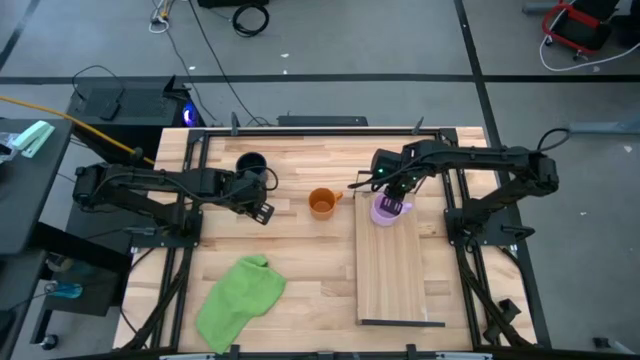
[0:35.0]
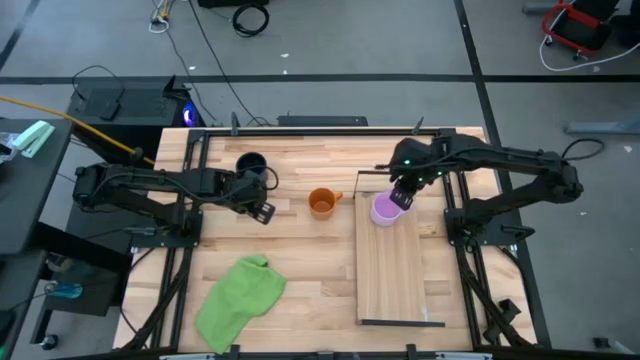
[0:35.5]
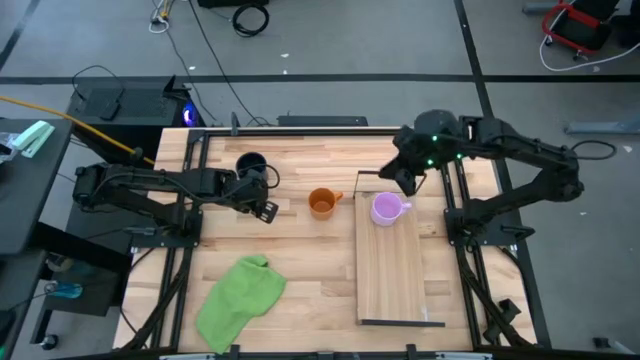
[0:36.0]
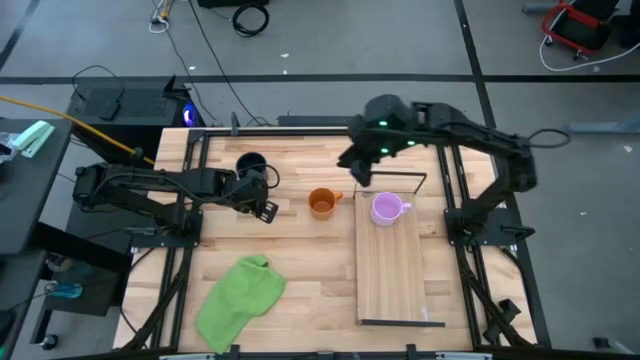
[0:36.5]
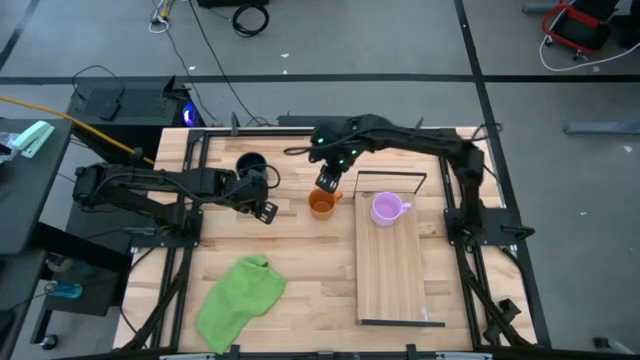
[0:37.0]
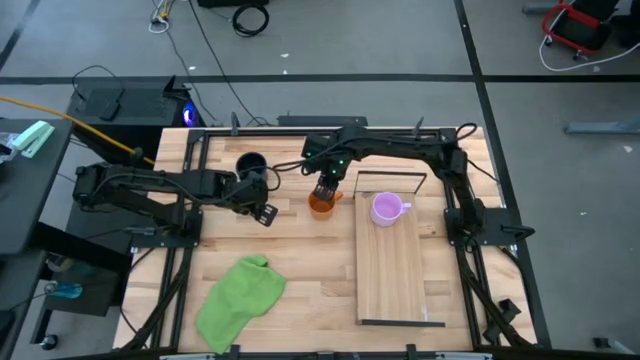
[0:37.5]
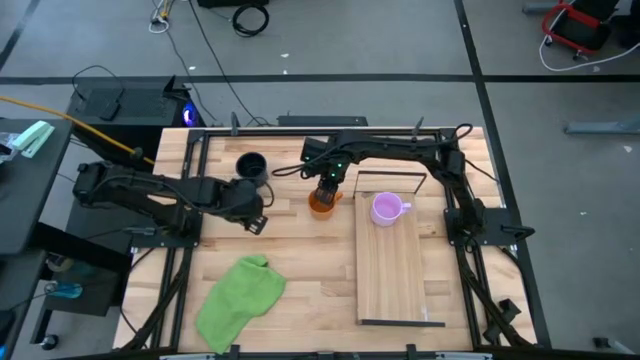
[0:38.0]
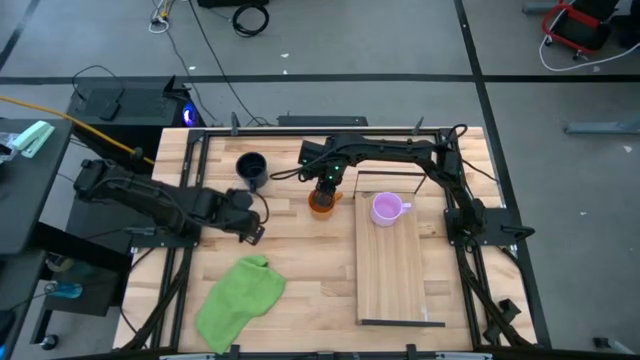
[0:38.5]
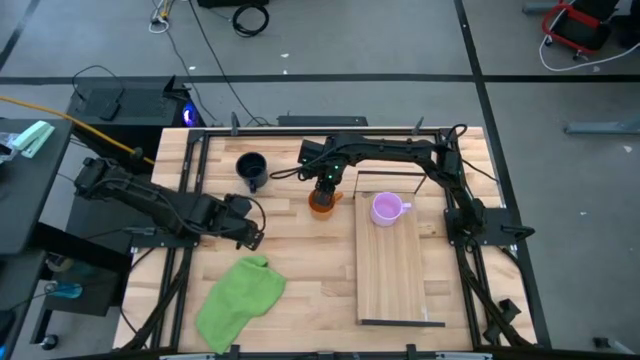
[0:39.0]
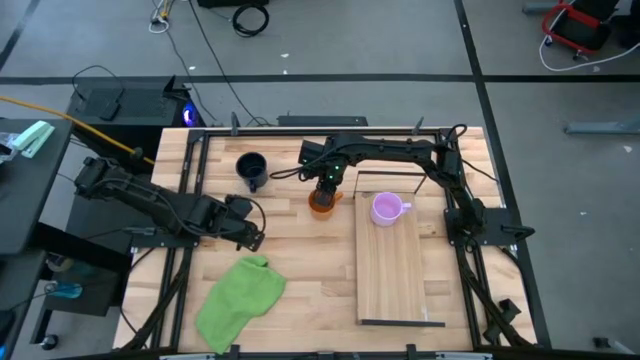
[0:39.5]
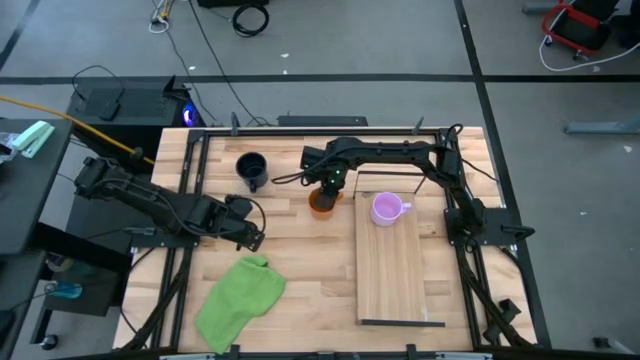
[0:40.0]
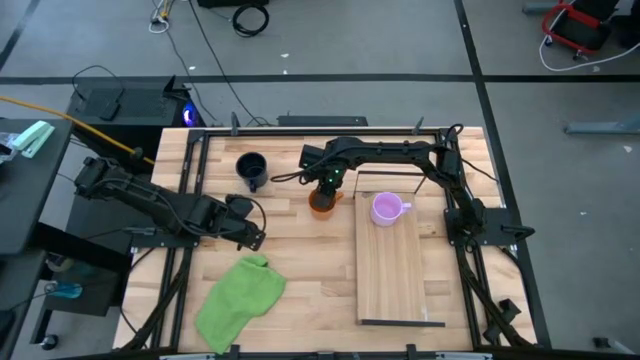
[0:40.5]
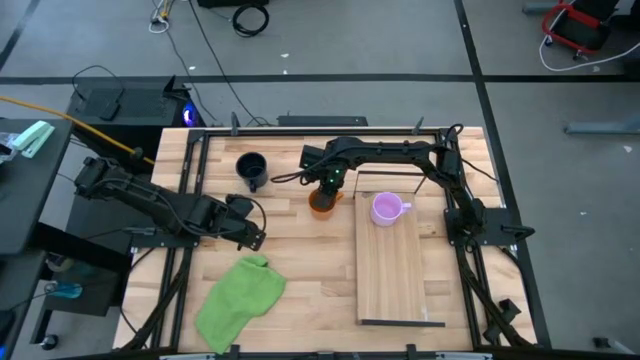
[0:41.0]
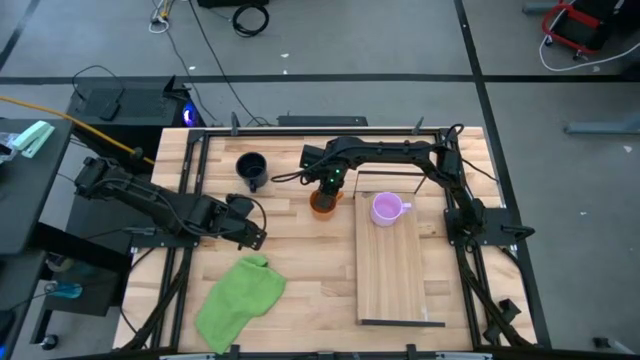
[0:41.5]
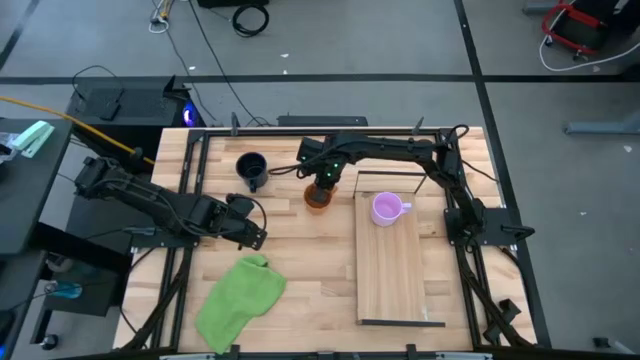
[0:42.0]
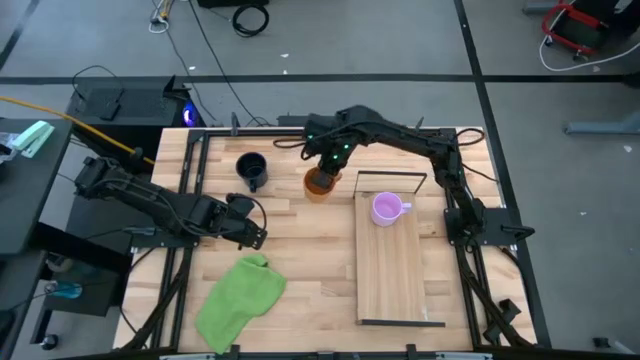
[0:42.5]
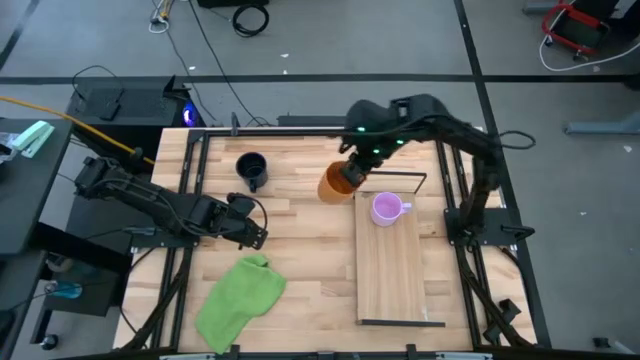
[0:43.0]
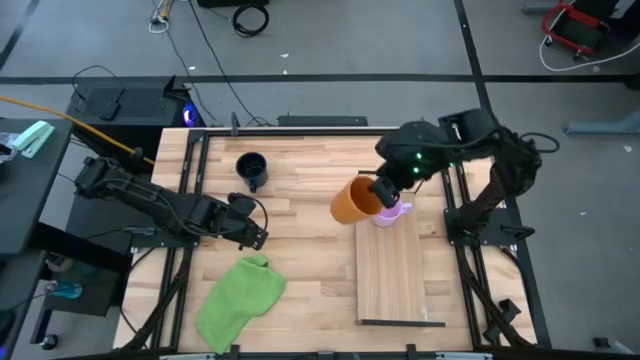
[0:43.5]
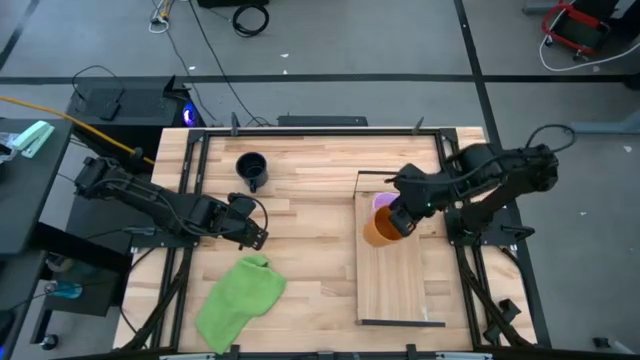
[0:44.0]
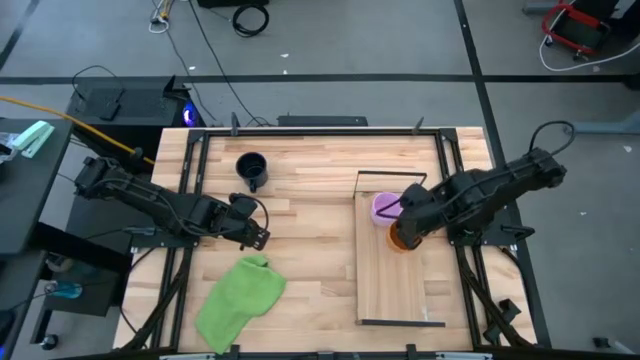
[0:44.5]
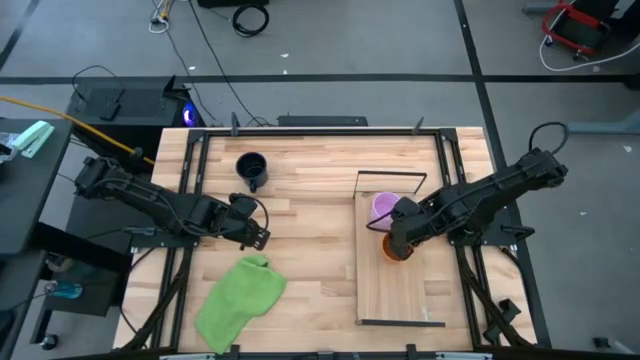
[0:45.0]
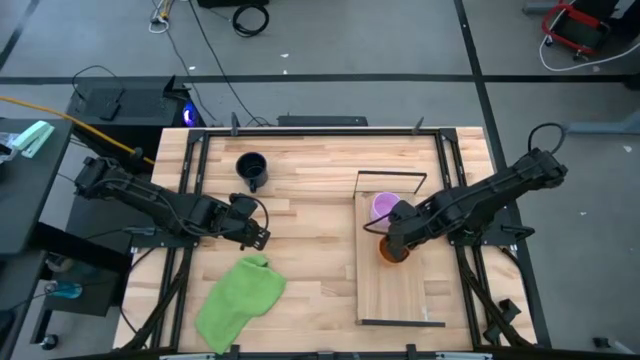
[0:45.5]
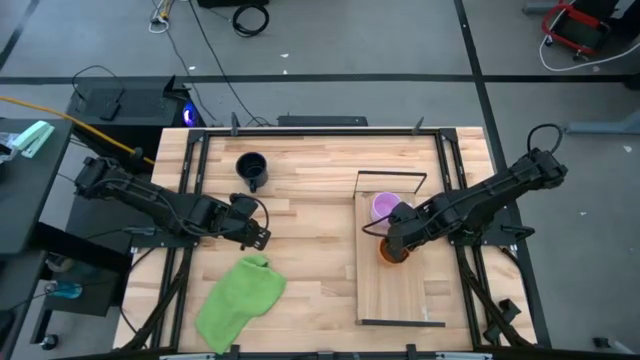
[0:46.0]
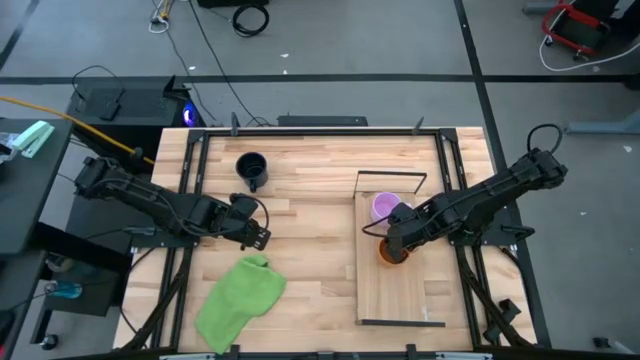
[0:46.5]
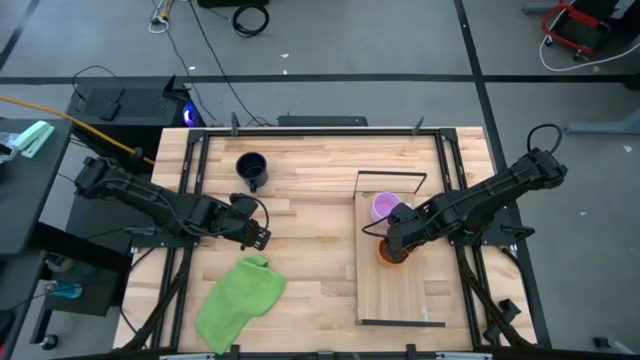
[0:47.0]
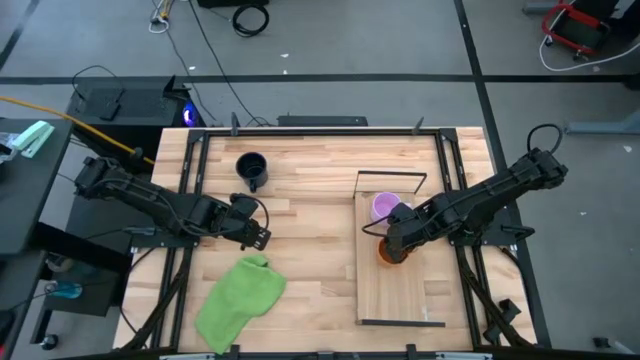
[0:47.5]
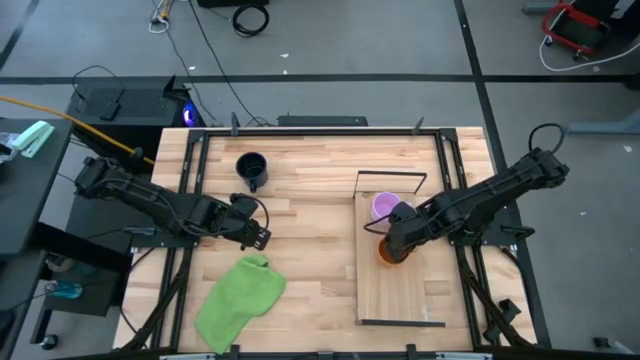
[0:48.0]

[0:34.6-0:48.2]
Task: Stack small to large cups/mugs on shelf
Put the orange mug on the table

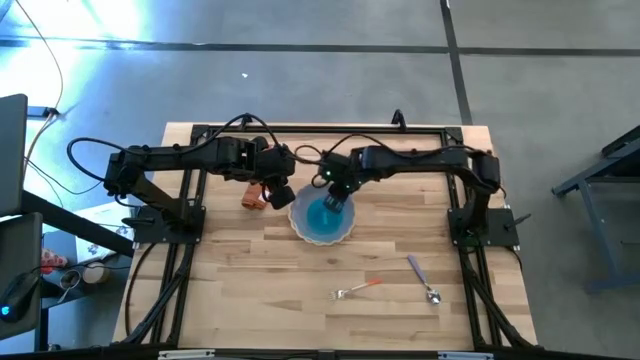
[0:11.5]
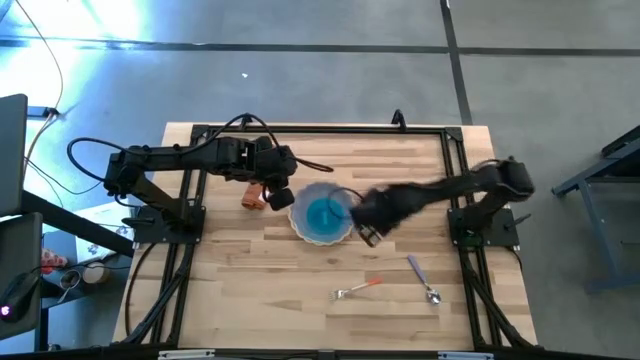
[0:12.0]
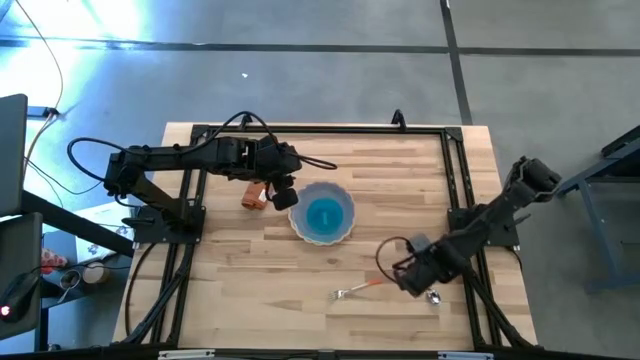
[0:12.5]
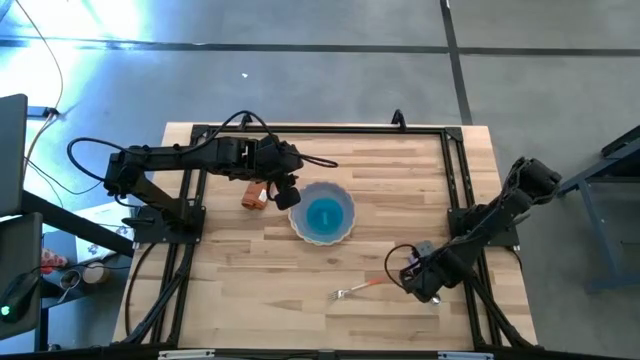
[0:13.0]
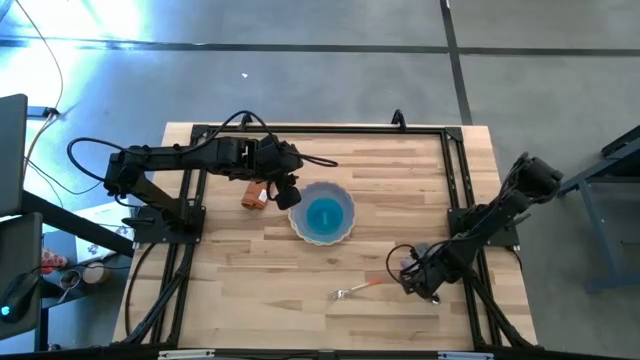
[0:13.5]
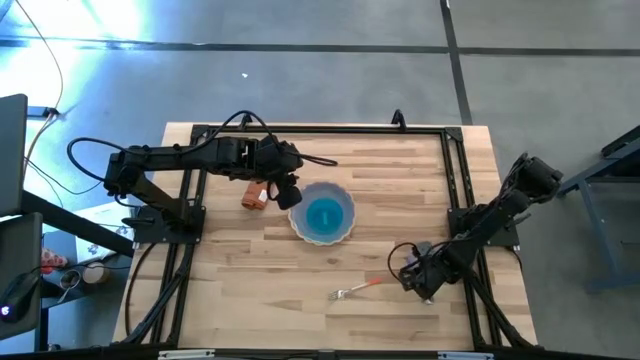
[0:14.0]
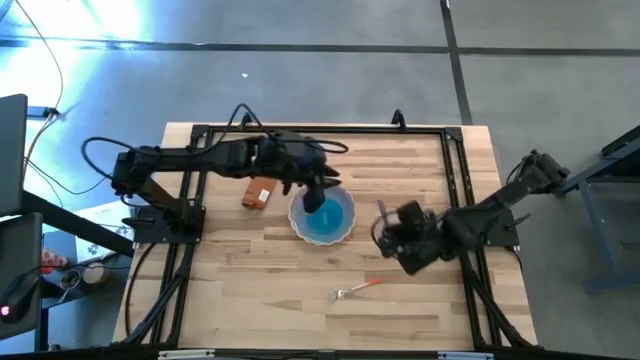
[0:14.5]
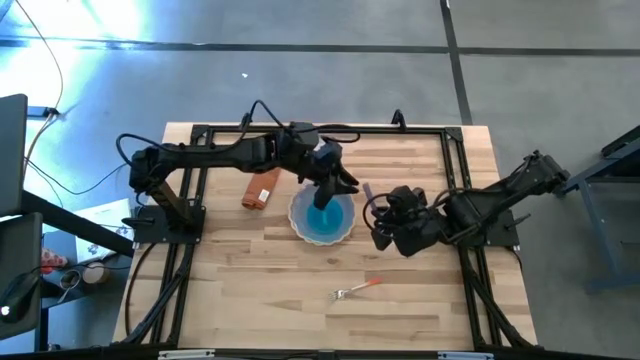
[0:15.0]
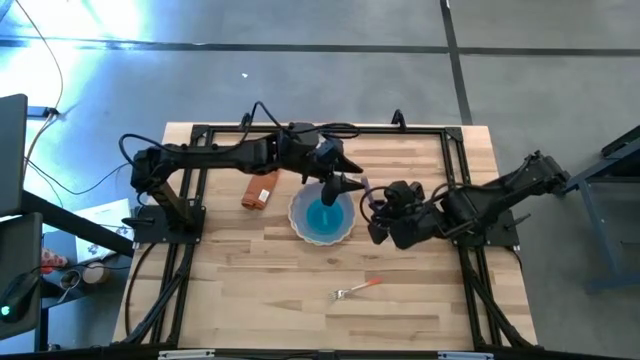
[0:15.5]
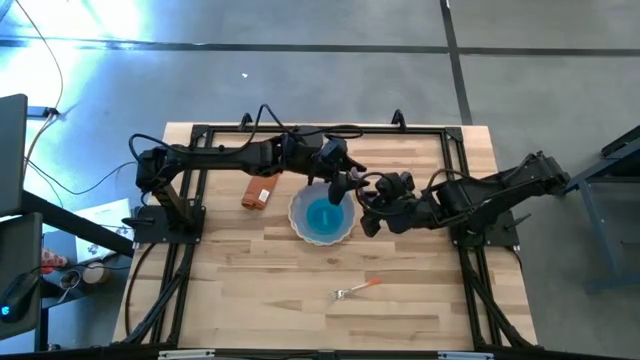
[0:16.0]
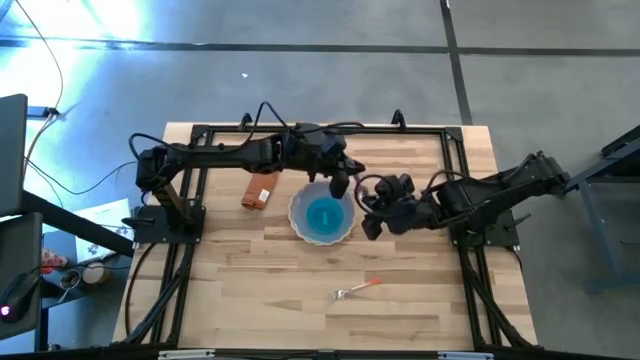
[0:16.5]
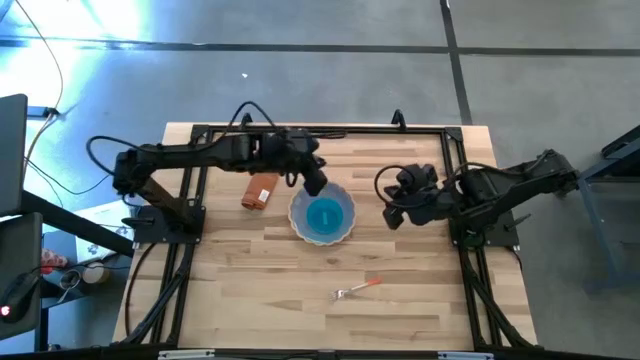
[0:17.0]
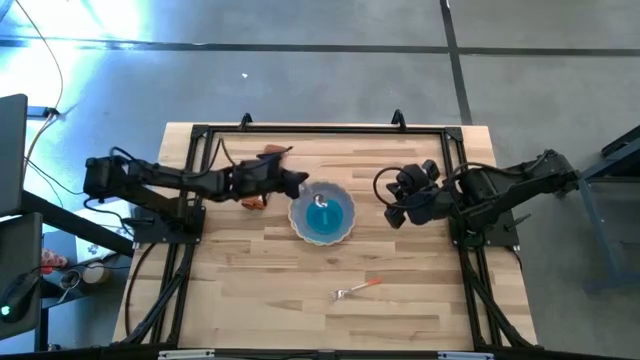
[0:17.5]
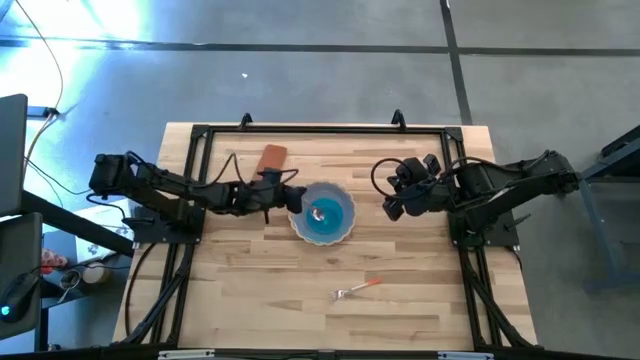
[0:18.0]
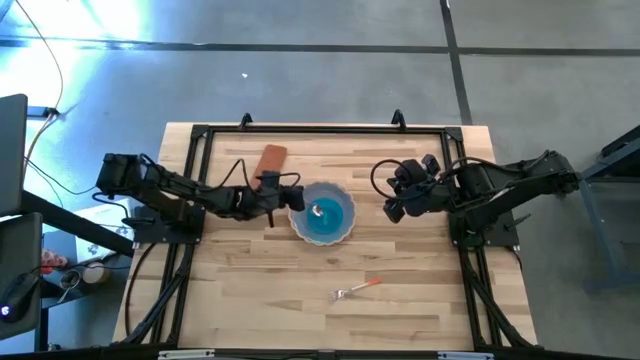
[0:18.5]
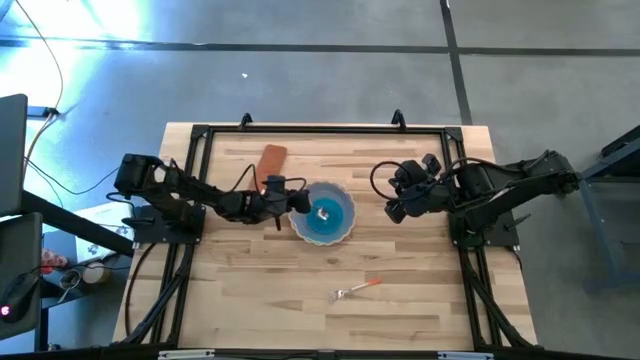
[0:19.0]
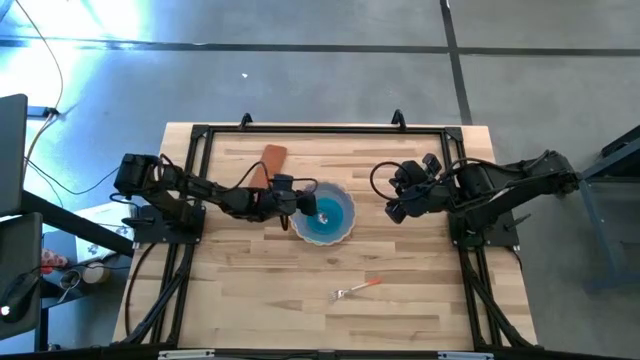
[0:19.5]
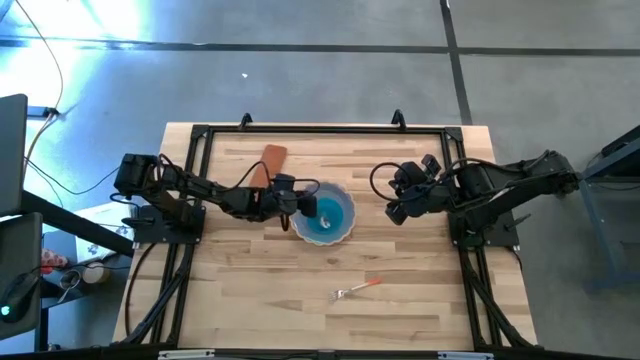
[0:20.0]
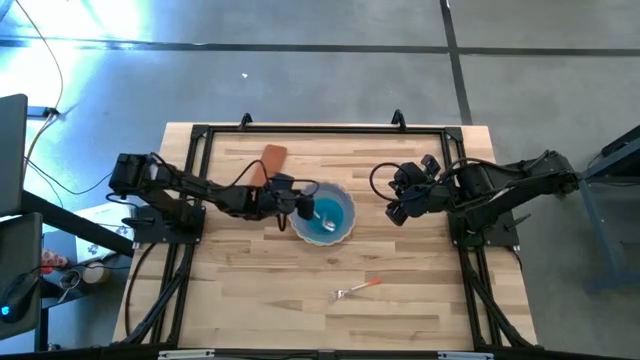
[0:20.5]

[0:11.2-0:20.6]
Task: Set table place
Put the purple spoon into the blue bowl
